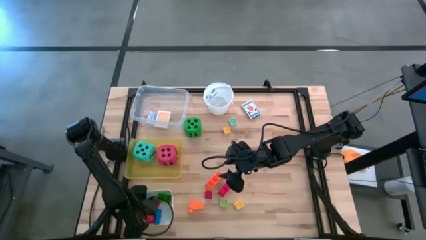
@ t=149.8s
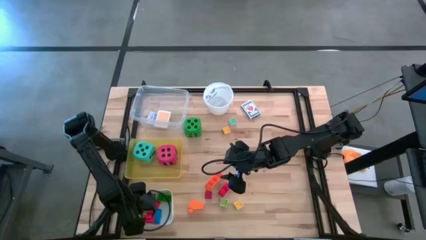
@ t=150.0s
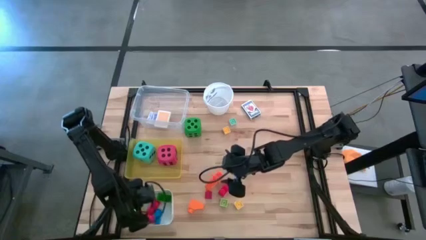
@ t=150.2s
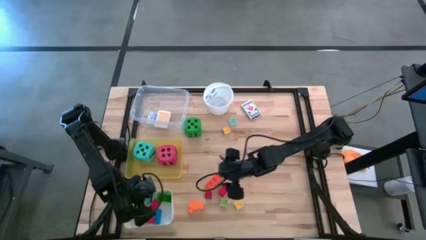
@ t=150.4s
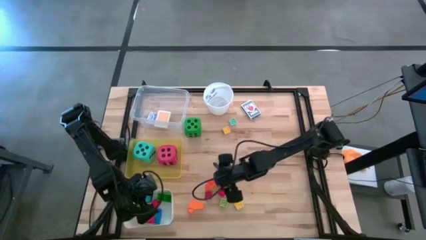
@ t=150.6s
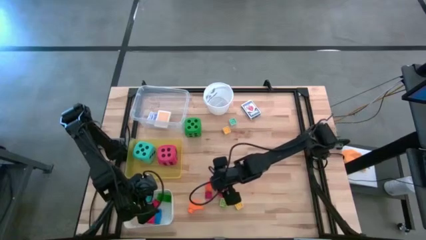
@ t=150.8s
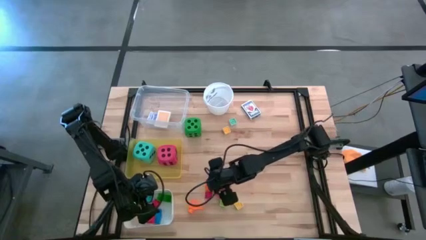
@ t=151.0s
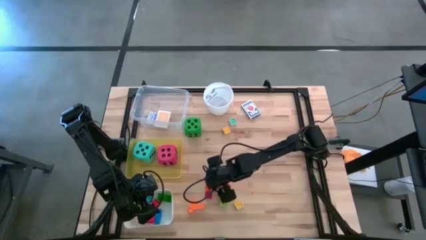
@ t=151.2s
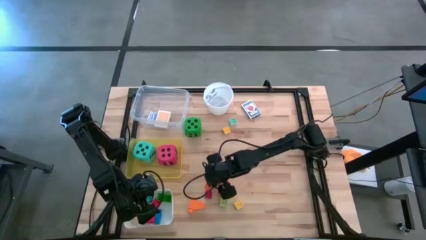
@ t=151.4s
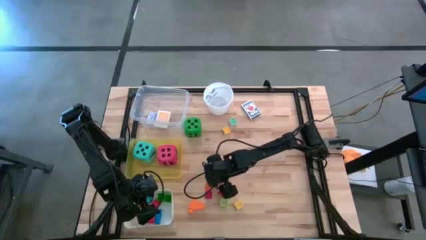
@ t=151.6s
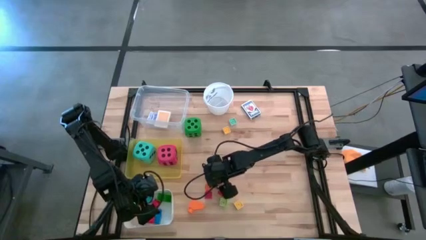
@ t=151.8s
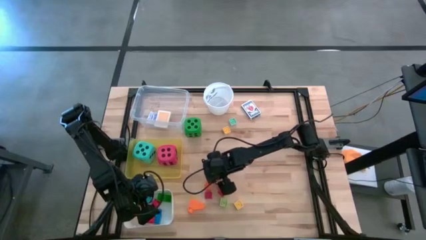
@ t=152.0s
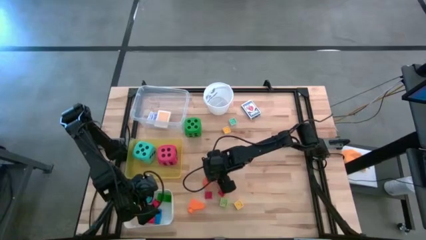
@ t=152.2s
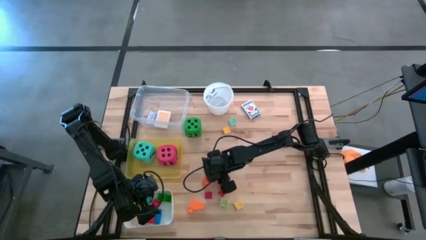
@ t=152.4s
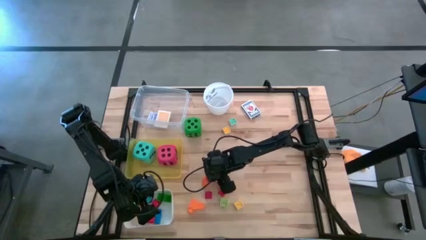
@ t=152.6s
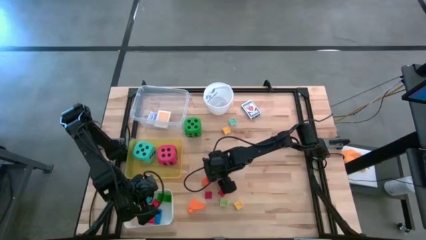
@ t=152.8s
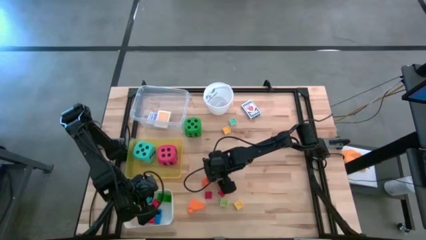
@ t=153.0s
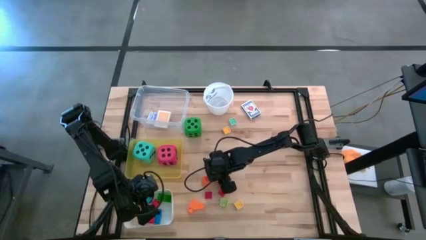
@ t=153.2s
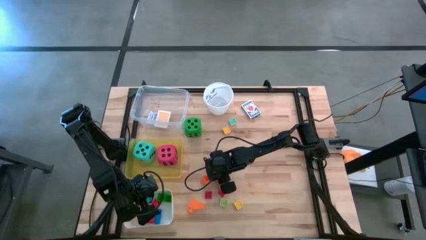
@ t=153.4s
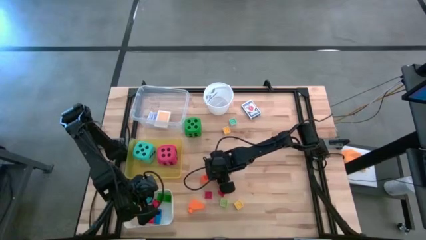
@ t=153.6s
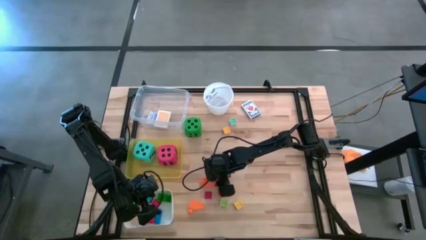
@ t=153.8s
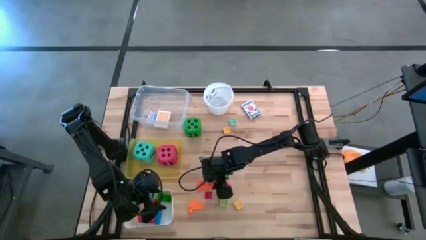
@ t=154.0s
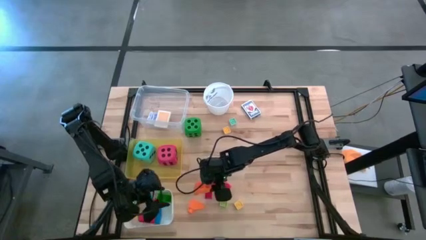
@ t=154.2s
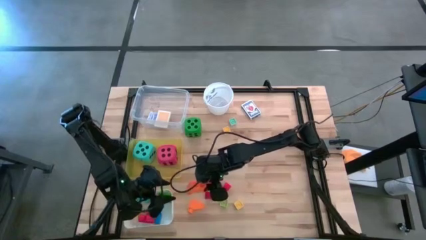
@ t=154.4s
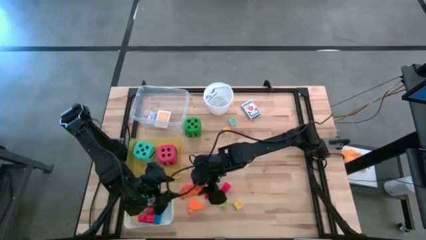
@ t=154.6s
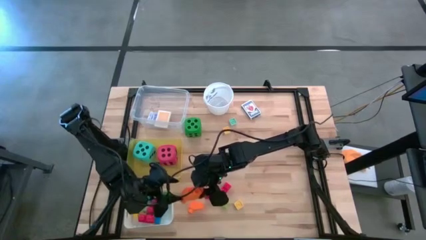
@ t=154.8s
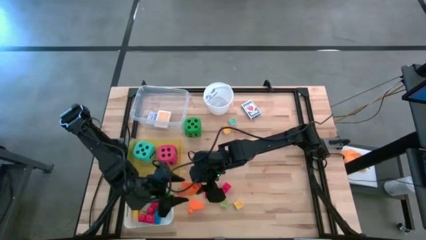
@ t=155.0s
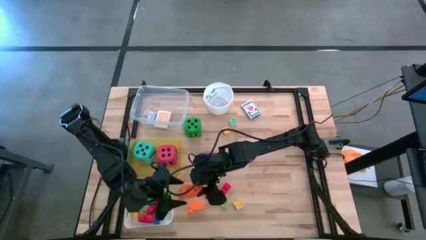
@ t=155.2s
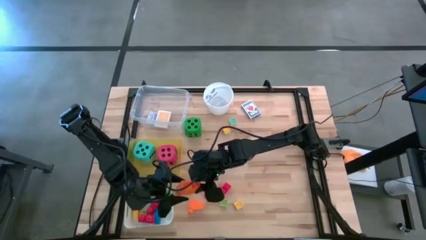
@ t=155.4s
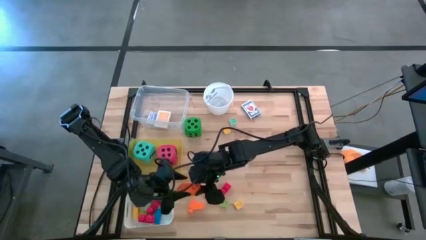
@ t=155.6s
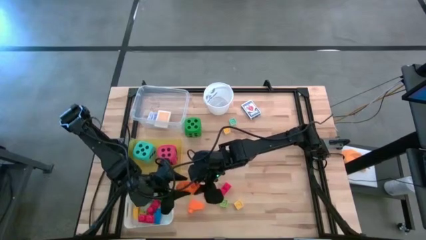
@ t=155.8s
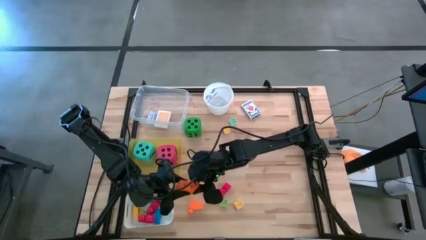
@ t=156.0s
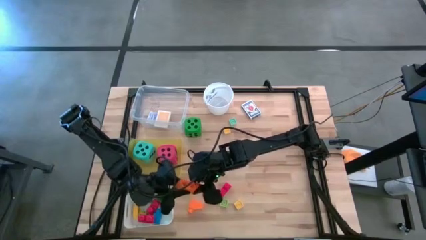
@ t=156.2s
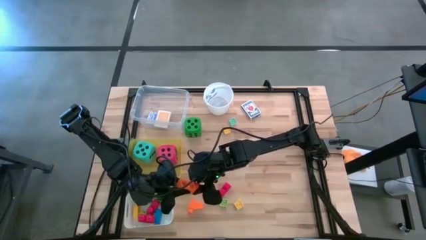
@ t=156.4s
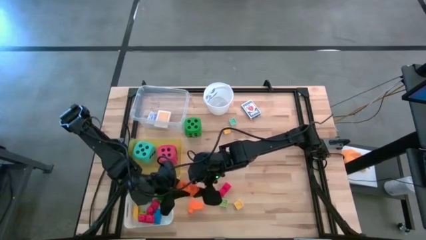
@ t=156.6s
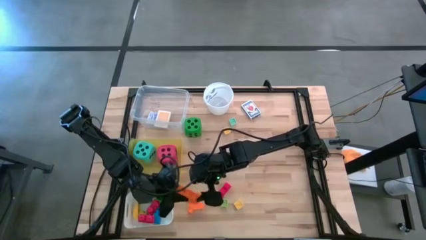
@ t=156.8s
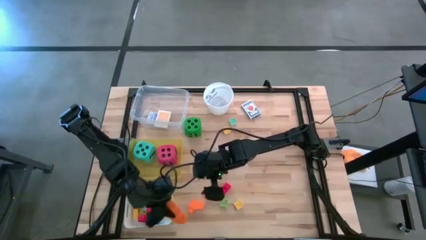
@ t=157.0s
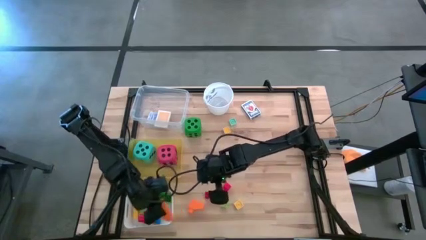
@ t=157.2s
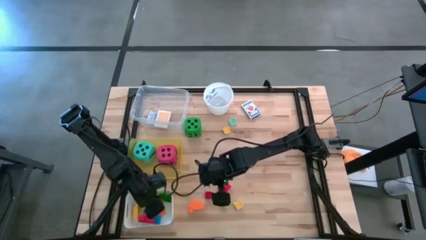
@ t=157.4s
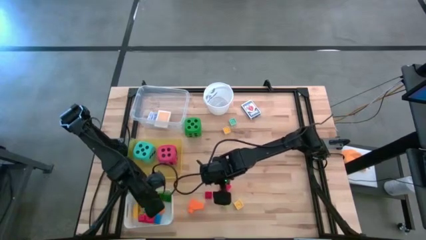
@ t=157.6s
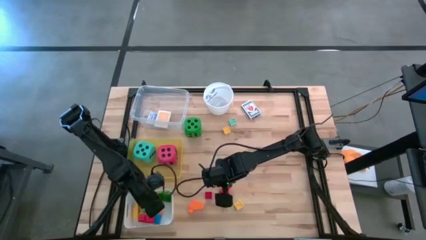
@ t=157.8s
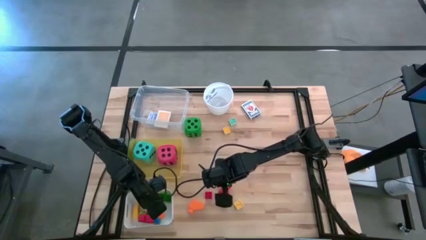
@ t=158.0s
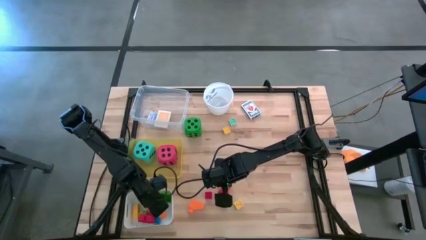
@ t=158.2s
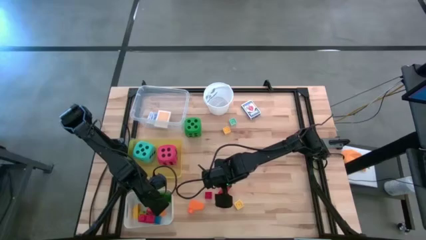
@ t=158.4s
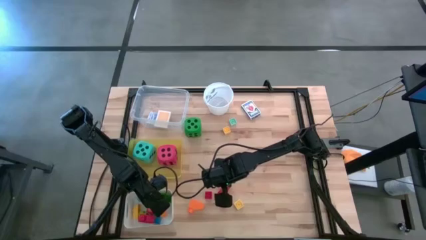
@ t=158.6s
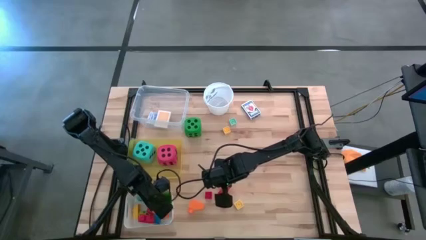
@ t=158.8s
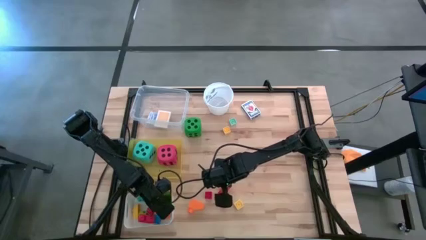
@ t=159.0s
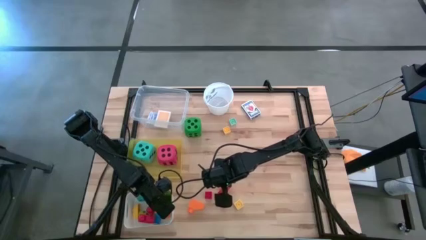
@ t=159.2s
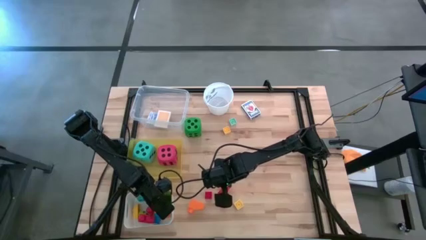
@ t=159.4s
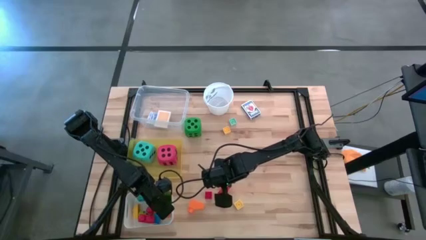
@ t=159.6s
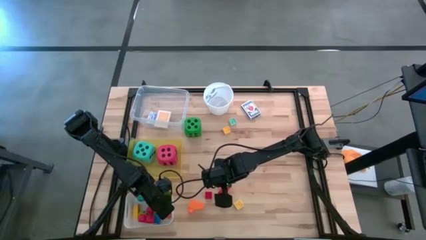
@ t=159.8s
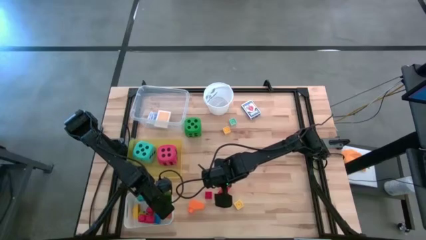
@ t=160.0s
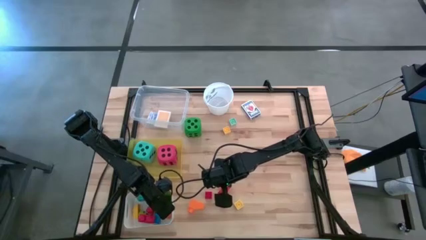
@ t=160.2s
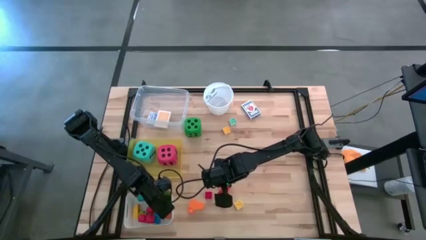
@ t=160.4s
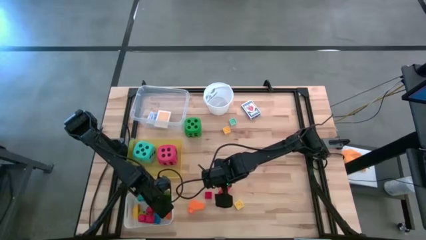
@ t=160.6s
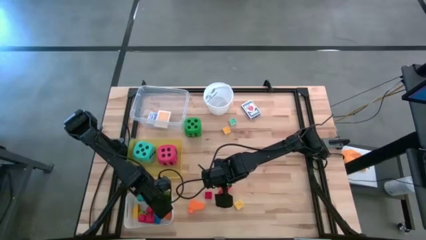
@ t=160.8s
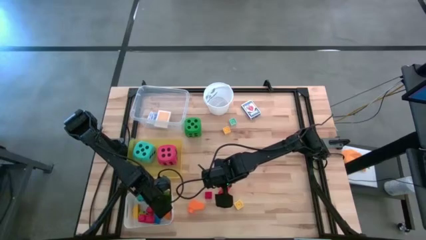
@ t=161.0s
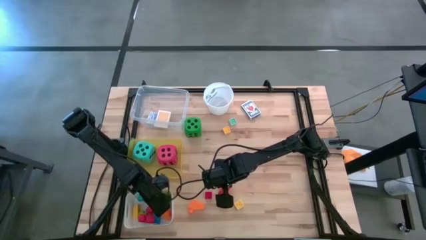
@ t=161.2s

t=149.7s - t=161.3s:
Task: Pick & Place Toys
Put the top orange game piece into the white bin

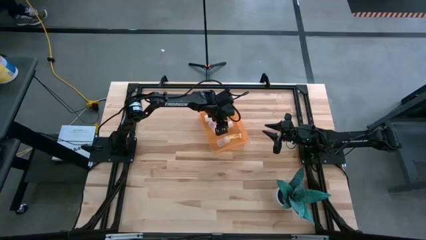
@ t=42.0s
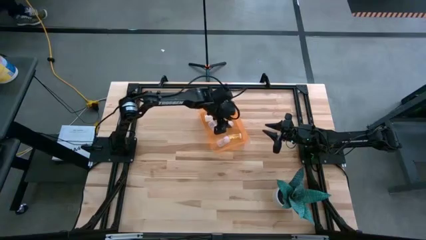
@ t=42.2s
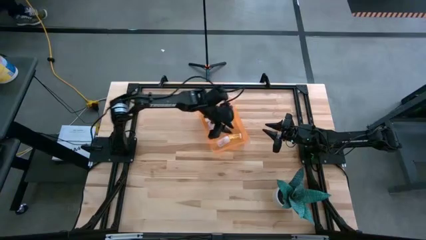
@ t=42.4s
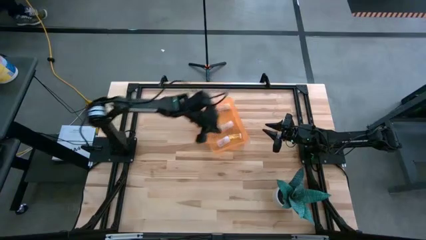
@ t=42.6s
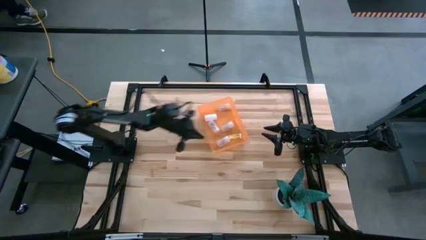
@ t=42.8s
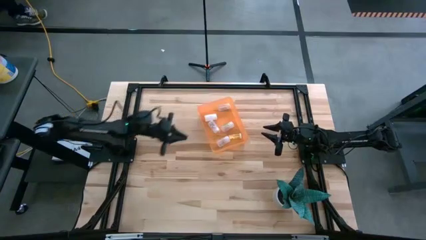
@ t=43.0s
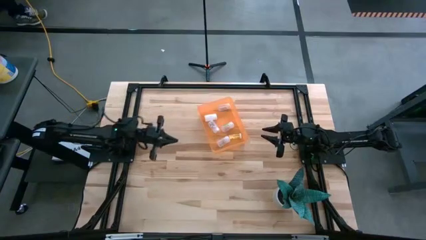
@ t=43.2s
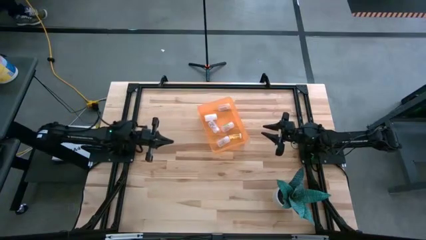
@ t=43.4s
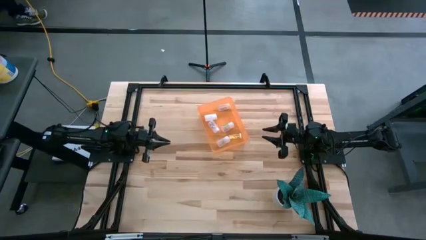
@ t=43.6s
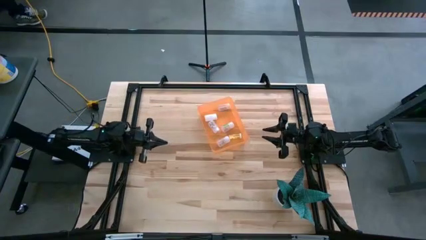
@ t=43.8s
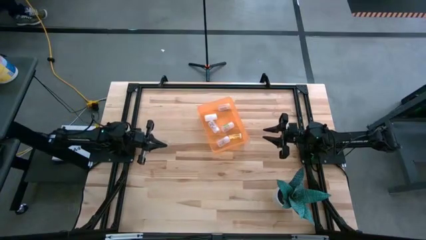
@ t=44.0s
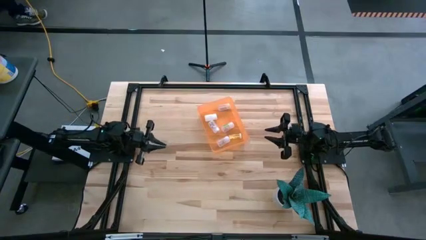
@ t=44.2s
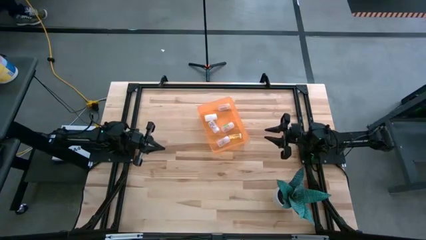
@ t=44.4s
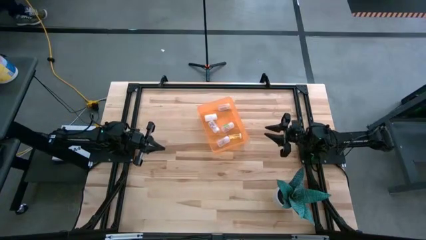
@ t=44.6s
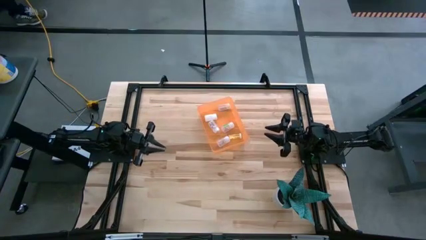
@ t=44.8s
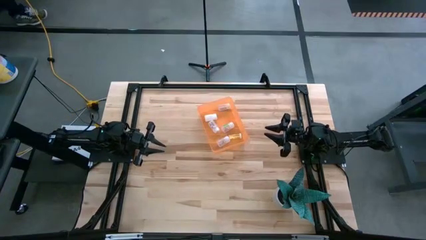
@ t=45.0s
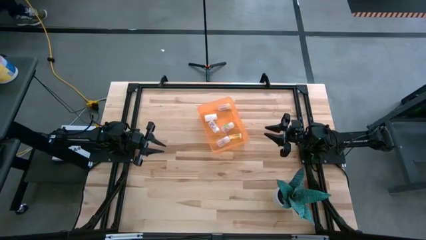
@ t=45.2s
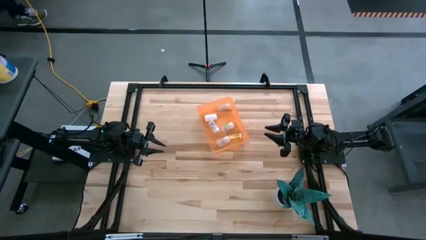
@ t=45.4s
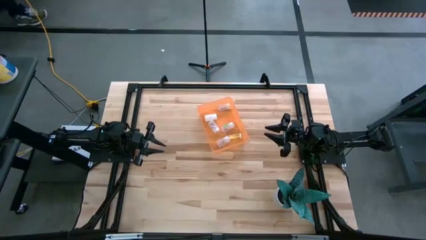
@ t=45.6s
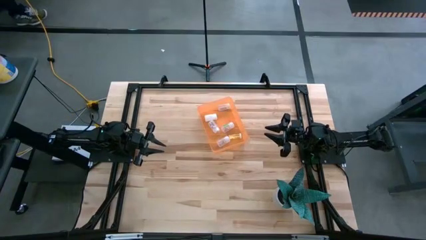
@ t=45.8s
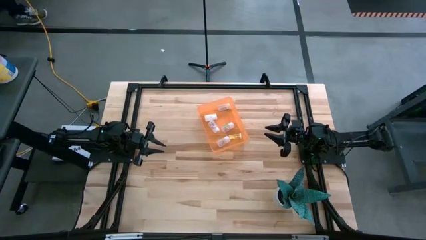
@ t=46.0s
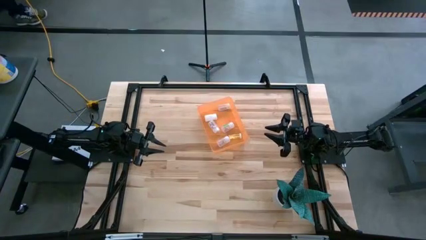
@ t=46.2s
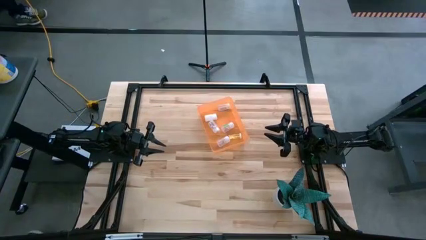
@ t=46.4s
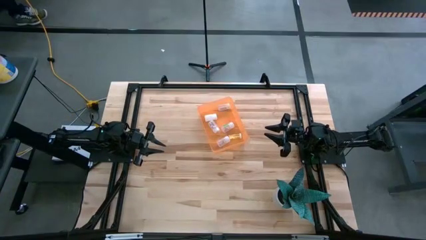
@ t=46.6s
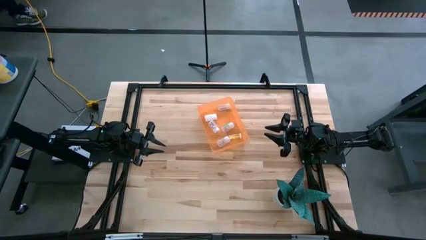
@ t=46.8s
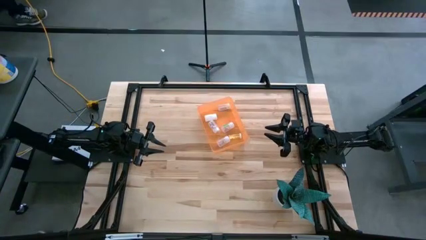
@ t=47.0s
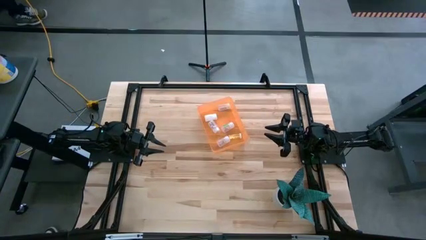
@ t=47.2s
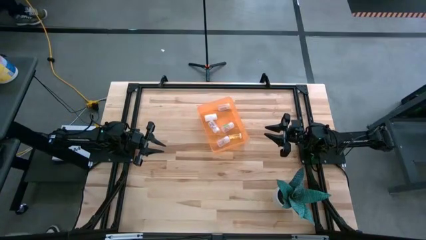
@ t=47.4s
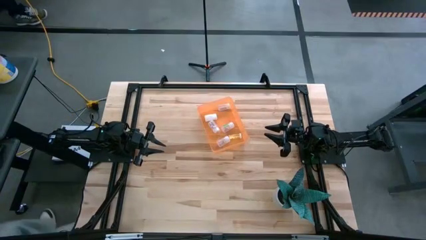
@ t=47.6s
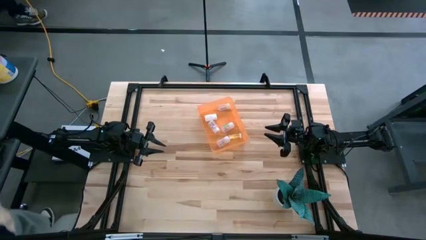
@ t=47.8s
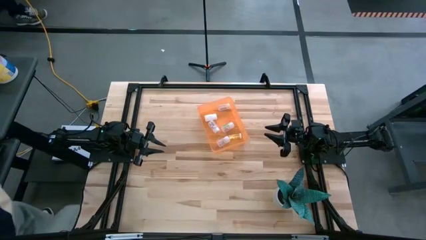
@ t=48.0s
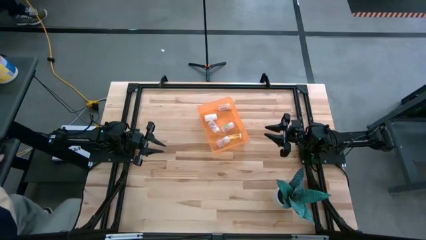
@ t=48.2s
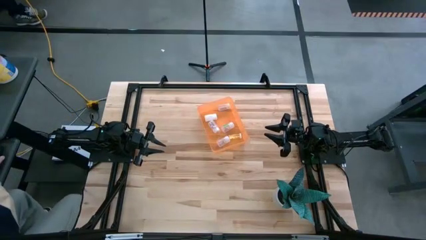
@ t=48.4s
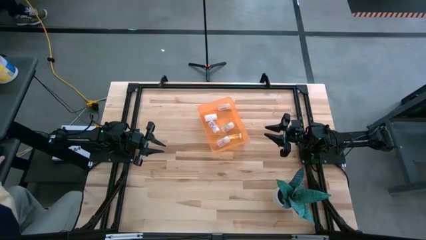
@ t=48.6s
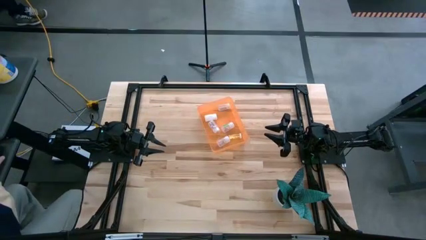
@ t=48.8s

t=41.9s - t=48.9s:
Task: Pick and place pill bottles into a basket
Return to Home Position
